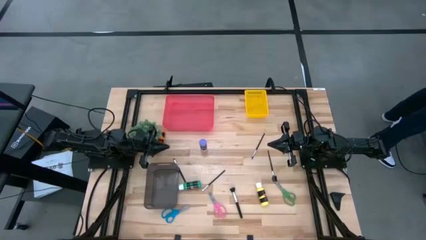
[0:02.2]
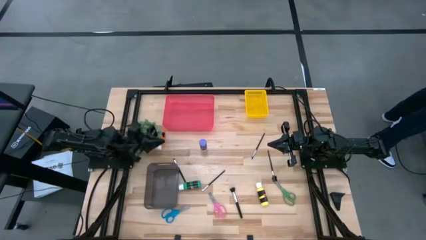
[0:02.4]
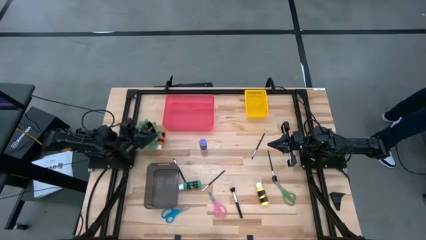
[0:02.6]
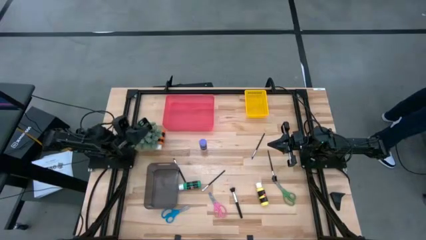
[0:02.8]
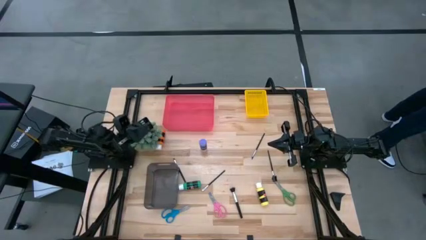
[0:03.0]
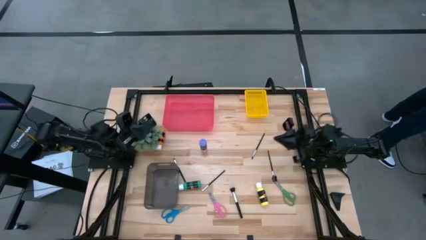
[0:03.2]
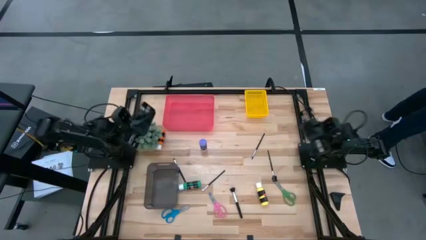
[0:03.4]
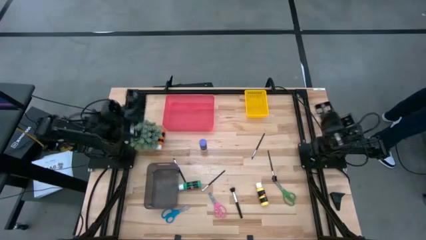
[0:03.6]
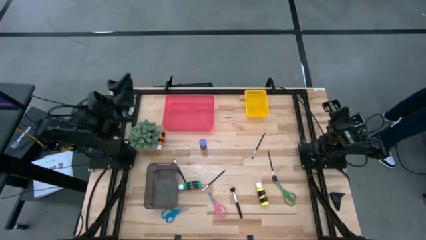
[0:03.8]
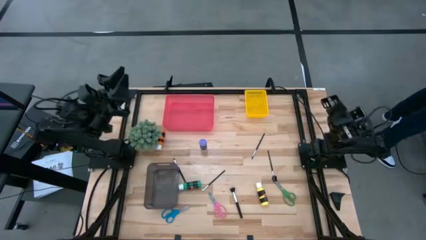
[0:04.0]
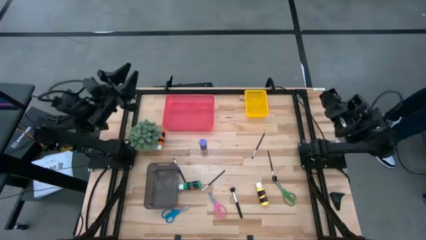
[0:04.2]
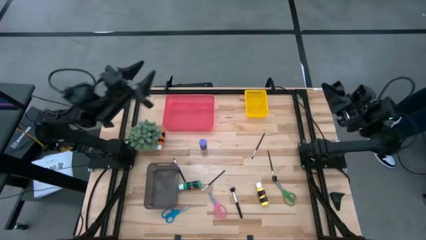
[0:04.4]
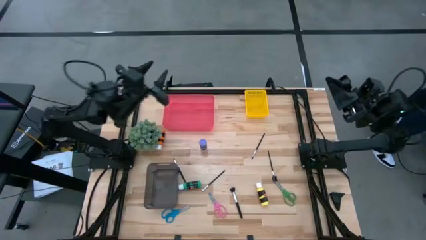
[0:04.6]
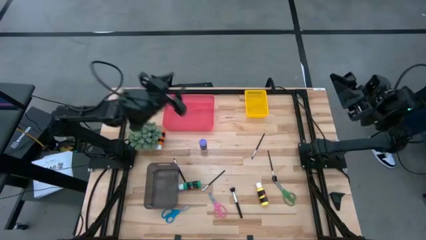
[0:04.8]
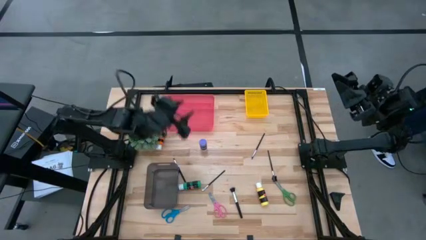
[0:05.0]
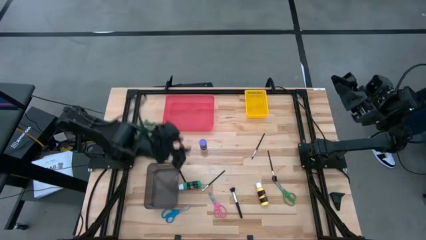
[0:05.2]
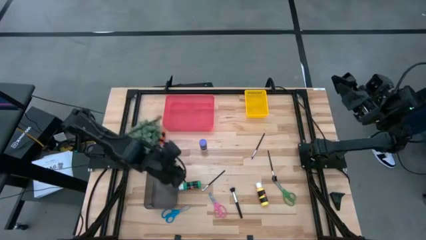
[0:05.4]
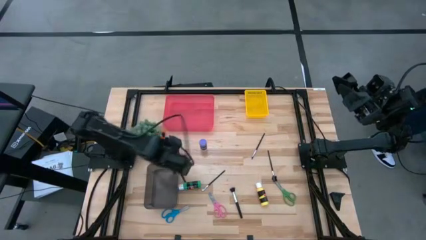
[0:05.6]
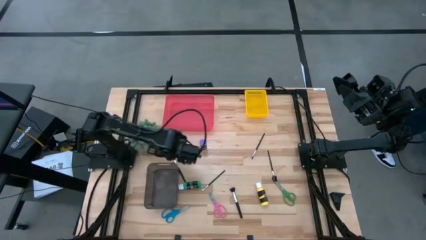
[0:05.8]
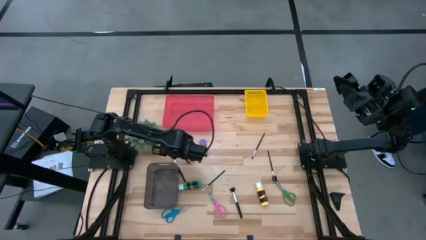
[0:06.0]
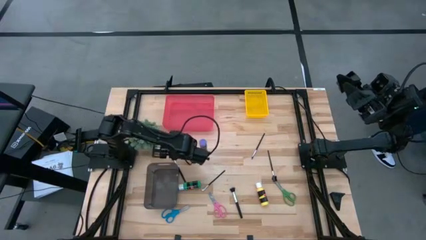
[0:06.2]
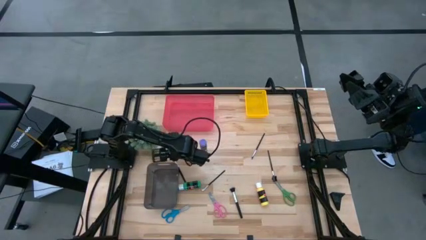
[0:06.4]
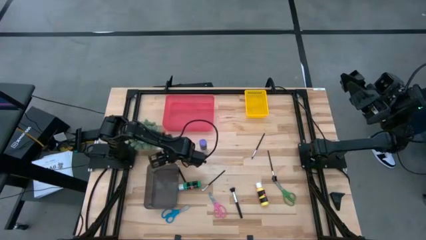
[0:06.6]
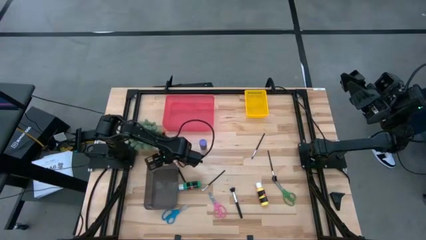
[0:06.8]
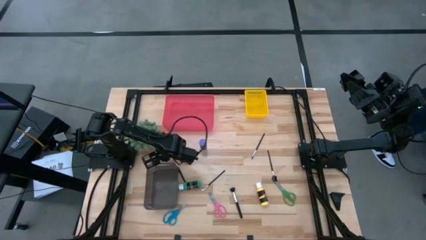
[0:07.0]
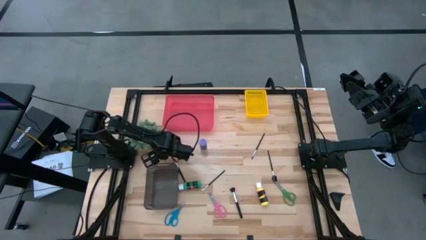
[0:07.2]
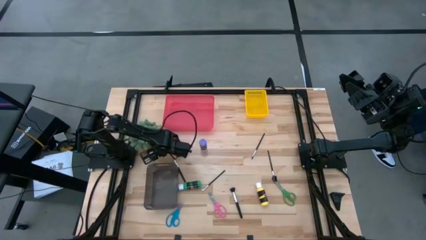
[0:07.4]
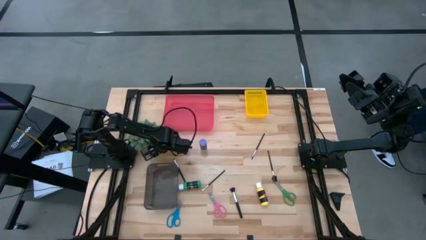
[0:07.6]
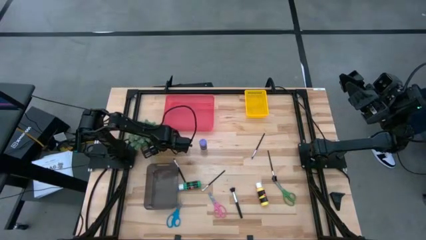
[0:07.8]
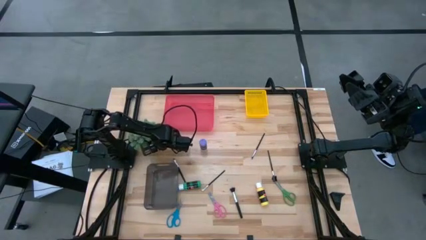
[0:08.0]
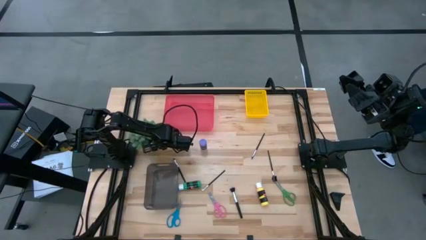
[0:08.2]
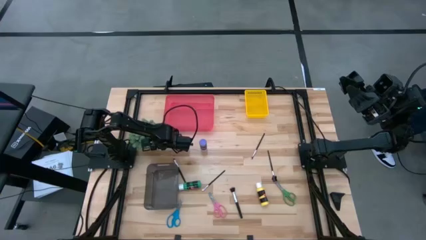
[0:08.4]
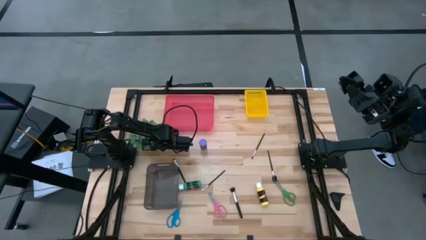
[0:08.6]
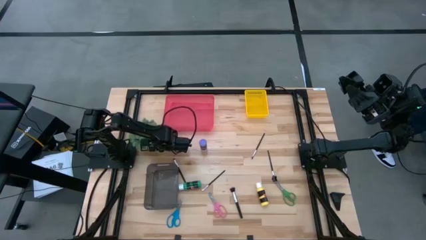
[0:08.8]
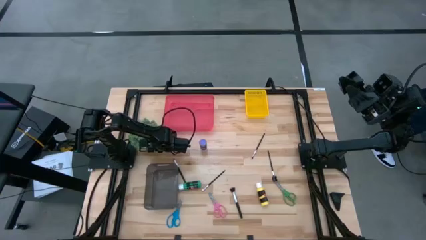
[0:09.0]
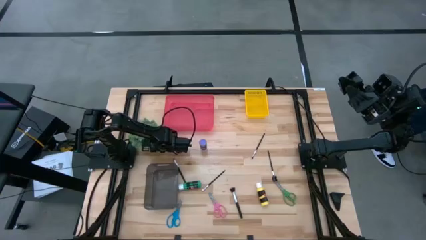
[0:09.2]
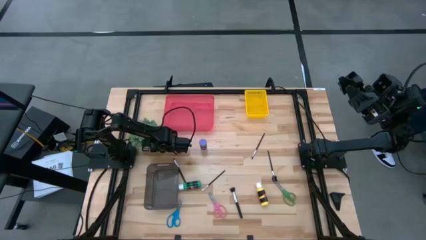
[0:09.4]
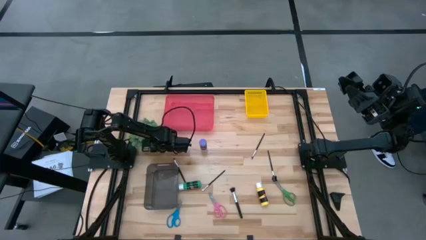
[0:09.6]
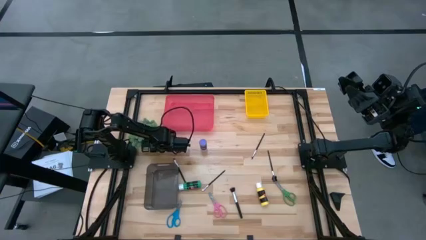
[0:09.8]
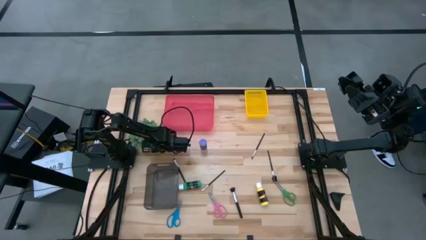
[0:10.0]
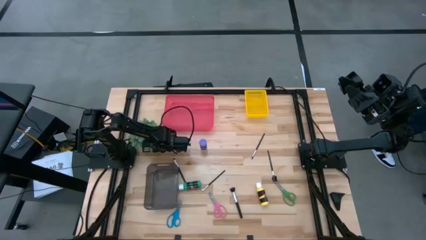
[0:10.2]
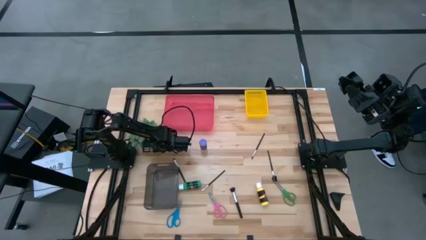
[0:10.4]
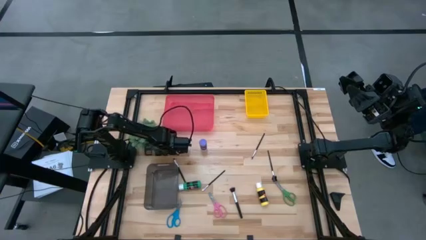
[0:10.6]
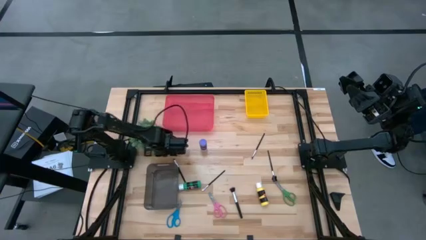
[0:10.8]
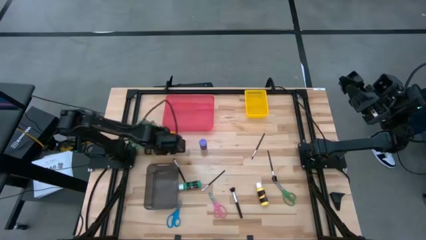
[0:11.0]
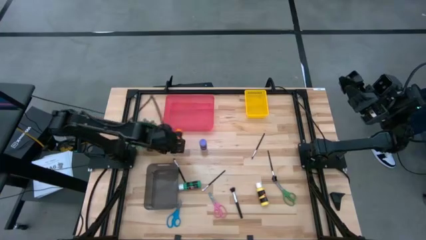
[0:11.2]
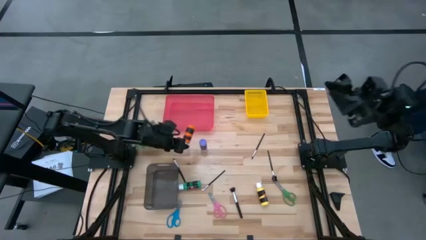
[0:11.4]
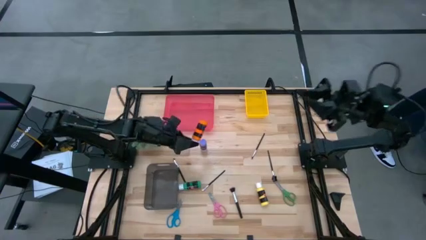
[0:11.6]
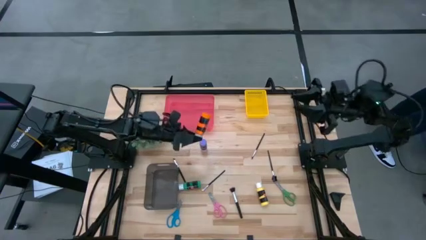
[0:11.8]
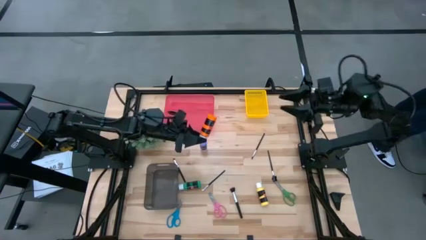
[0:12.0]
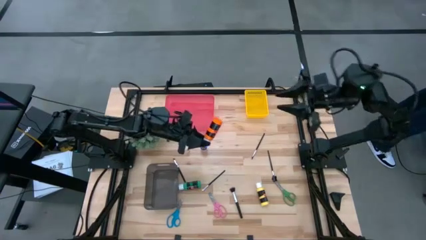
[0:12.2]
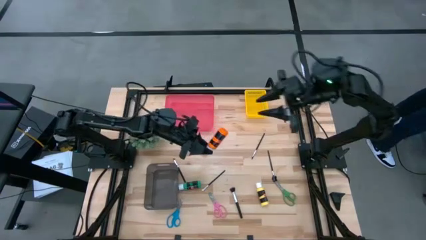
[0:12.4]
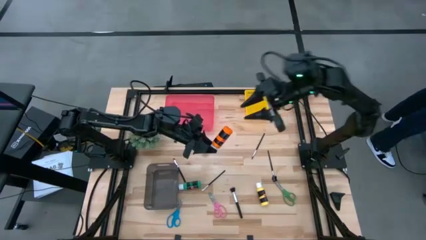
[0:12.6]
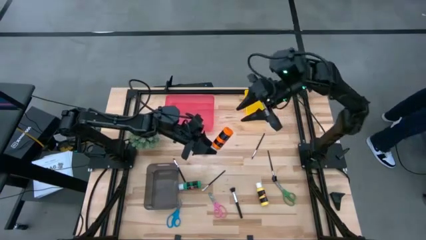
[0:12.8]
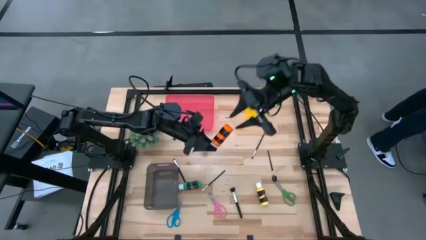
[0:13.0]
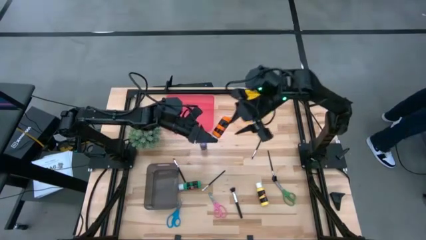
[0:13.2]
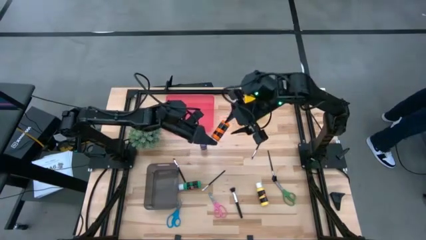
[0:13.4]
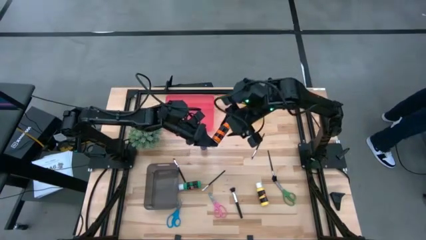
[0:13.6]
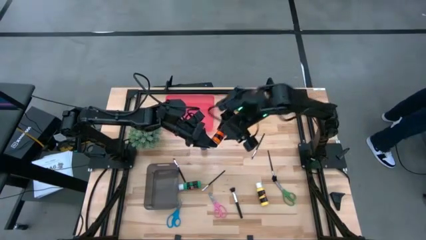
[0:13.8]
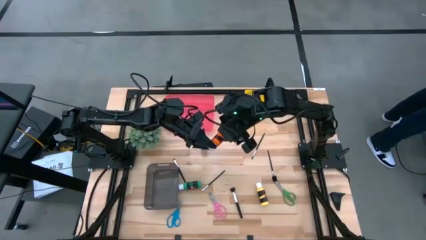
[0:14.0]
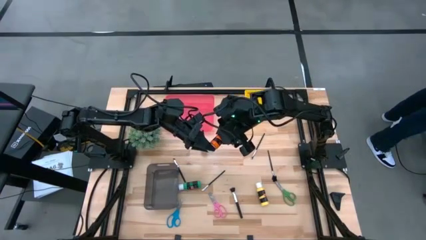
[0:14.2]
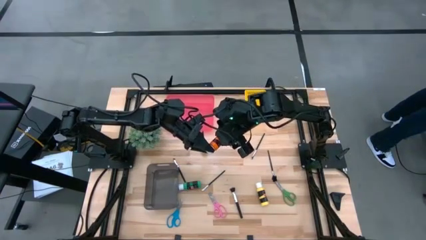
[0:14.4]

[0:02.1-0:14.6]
Task: Pick & Place Paint Supplies
Put the orange paint bottle into the yellow bin

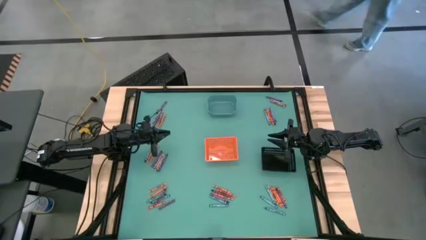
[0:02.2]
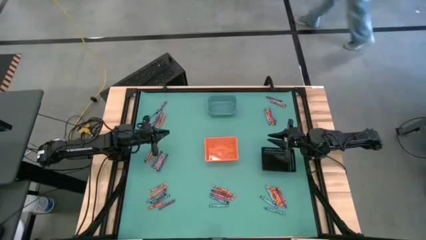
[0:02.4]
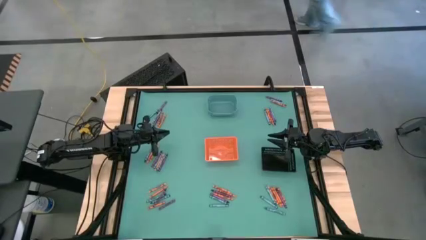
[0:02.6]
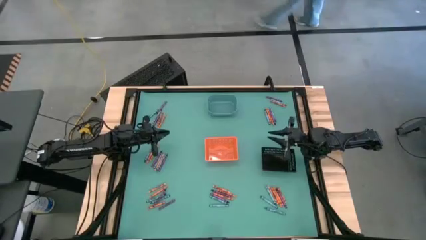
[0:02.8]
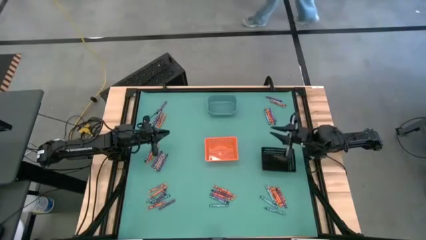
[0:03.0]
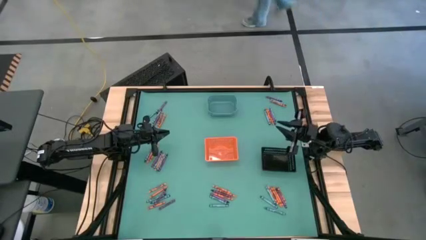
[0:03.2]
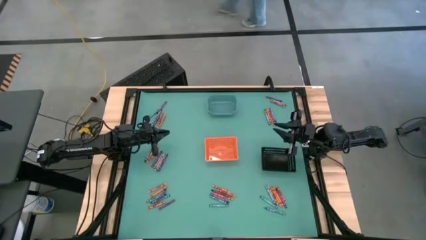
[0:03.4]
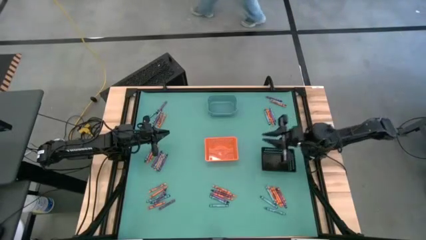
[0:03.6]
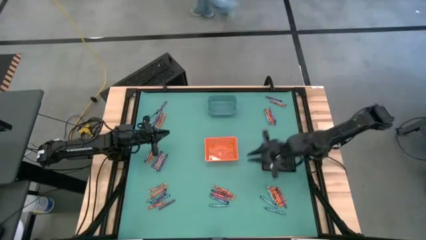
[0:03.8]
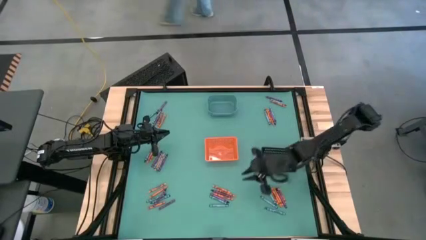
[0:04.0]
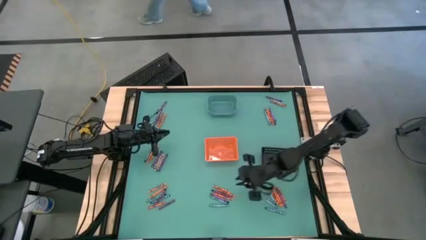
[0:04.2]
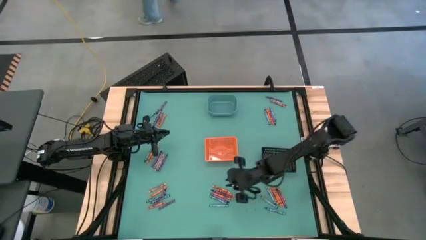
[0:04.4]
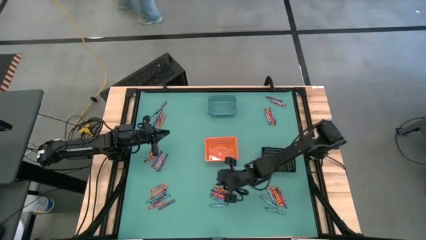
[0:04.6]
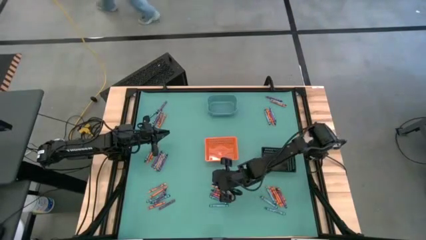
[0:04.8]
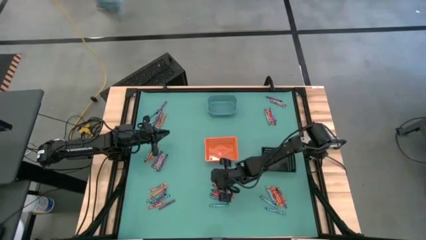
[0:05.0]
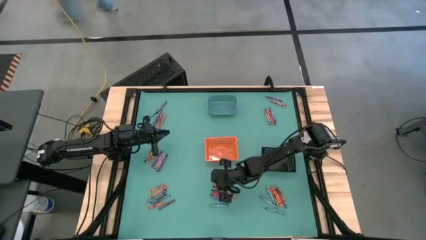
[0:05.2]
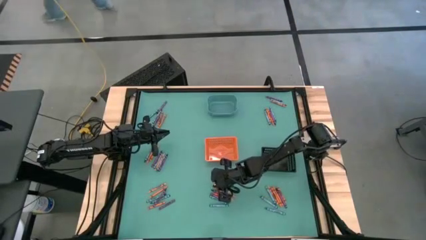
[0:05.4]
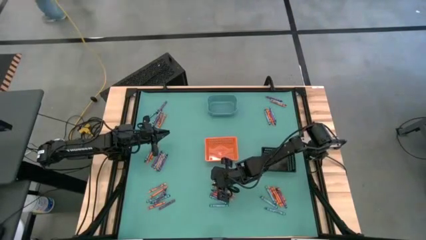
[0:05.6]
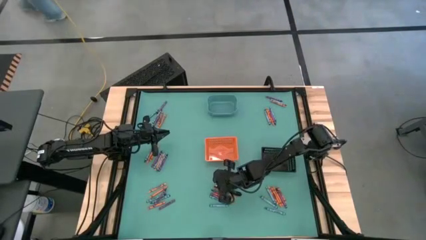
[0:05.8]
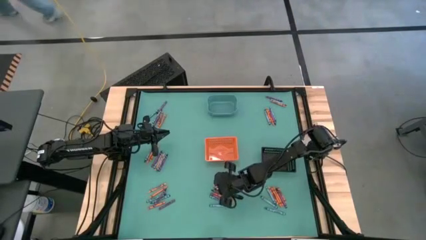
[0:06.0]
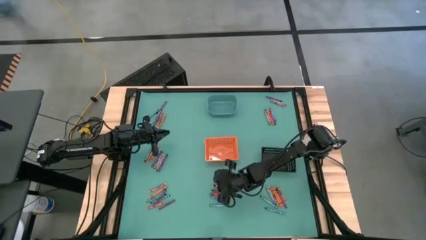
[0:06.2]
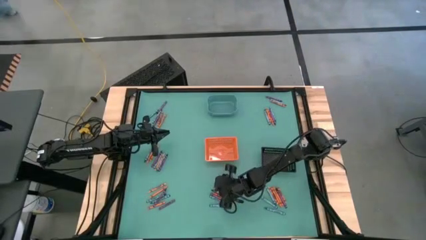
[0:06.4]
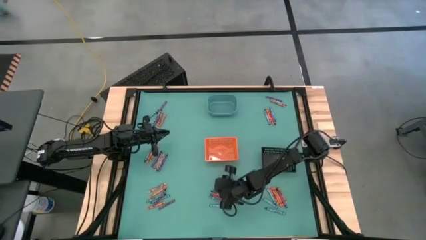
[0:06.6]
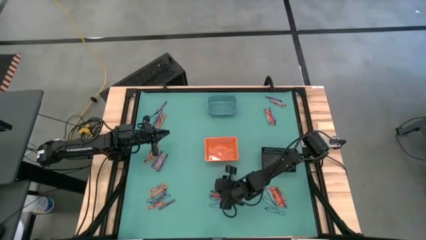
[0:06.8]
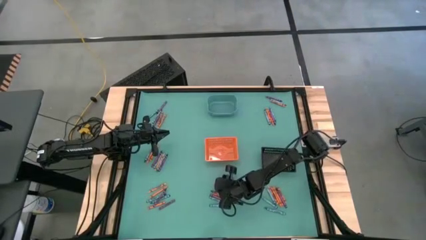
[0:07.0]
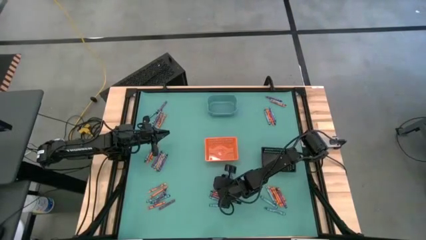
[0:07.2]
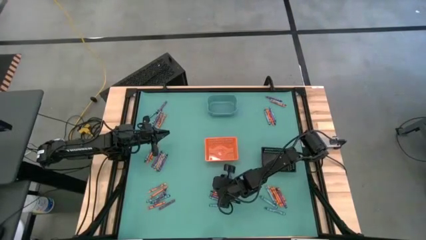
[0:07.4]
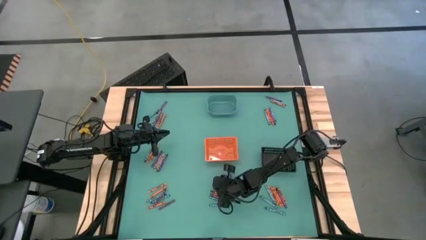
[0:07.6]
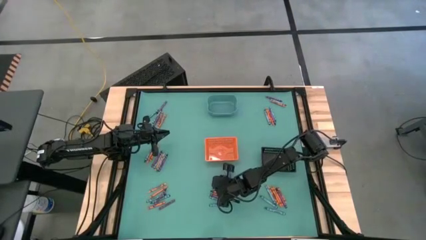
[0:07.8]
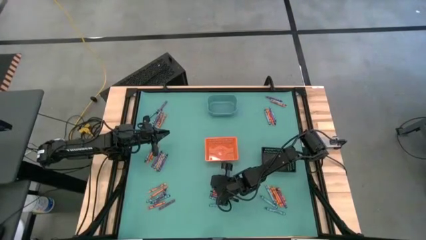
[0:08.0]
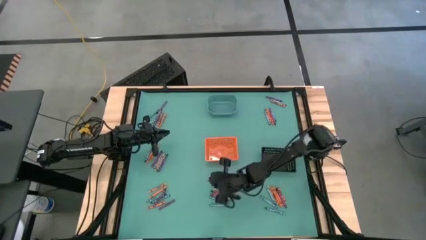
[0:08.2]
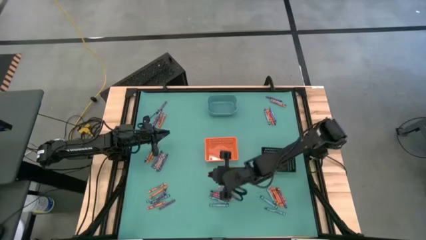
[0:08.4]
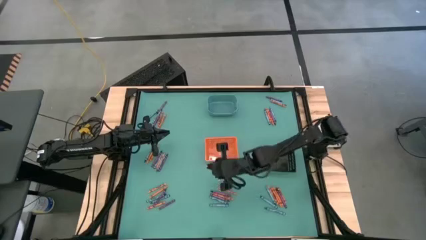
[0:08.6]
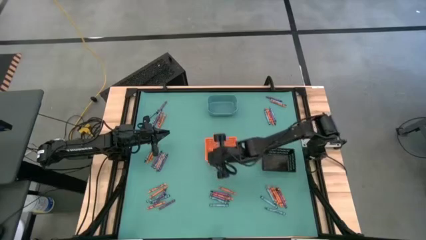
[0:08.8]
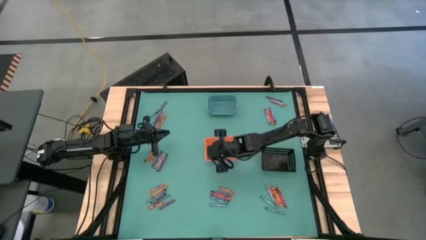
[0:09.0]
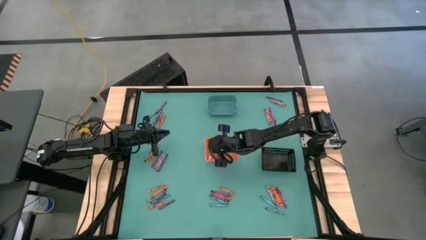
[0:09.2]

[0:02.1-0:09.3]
Task: Sort crayons
Put the orange crayon into the orange bin
